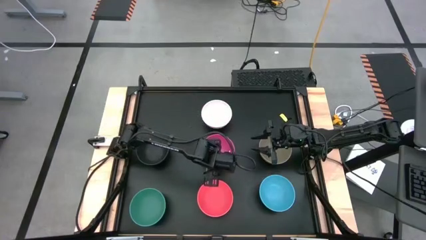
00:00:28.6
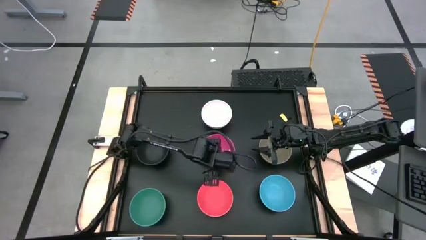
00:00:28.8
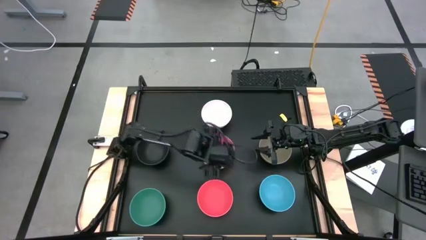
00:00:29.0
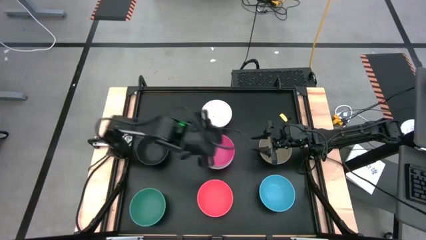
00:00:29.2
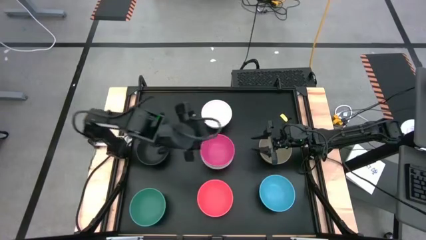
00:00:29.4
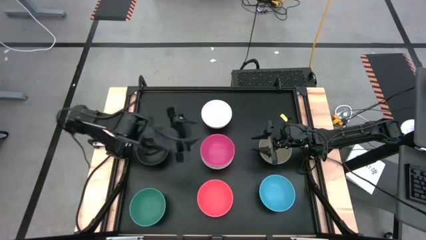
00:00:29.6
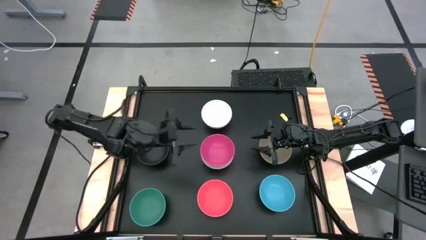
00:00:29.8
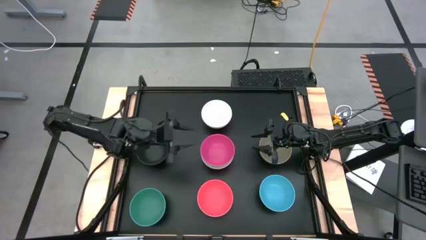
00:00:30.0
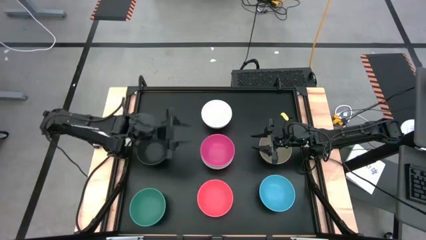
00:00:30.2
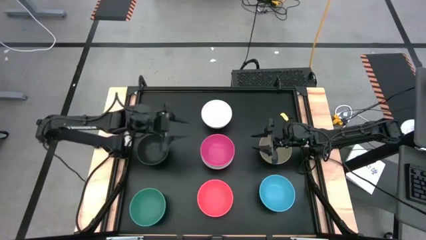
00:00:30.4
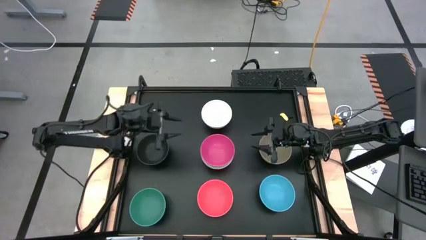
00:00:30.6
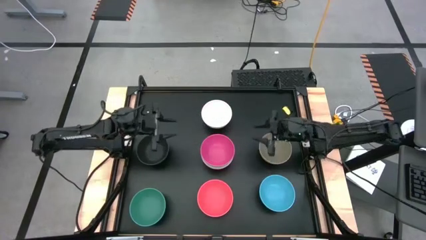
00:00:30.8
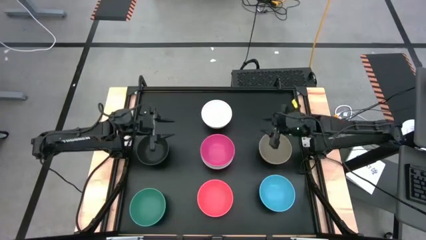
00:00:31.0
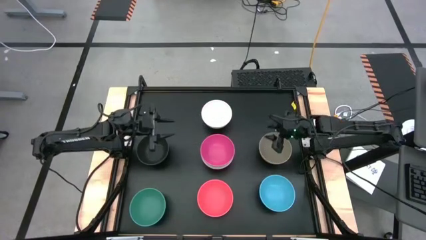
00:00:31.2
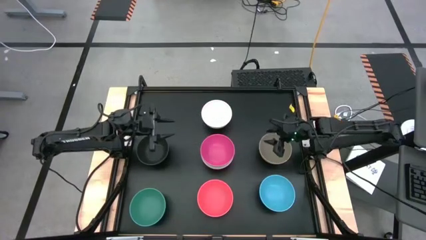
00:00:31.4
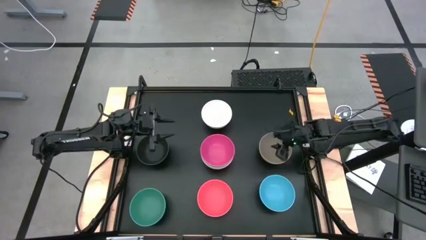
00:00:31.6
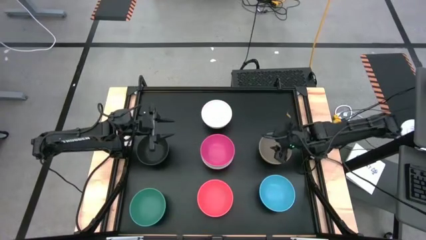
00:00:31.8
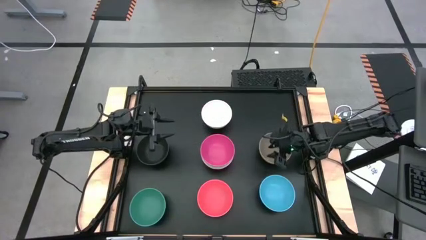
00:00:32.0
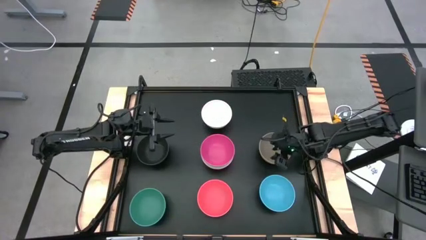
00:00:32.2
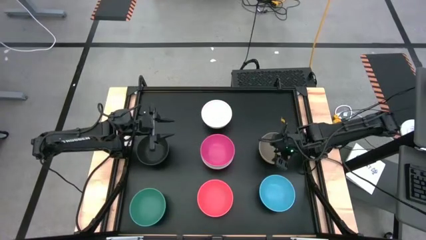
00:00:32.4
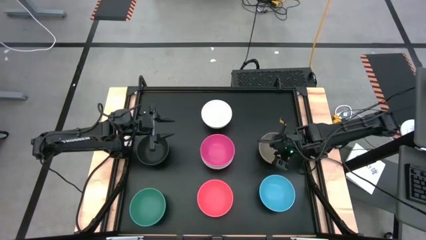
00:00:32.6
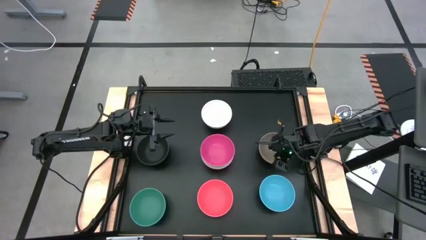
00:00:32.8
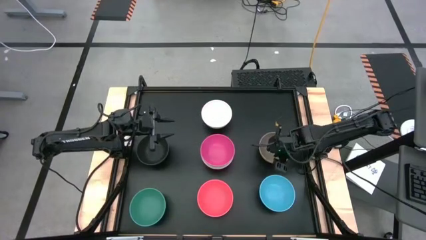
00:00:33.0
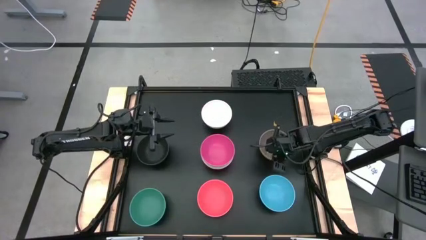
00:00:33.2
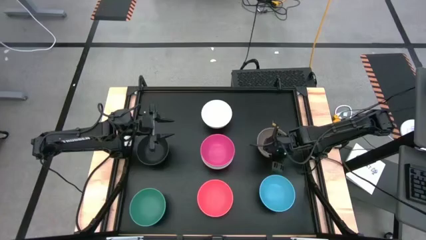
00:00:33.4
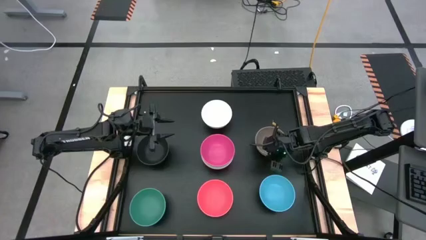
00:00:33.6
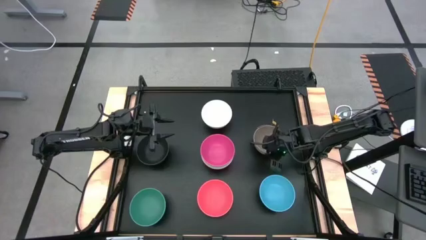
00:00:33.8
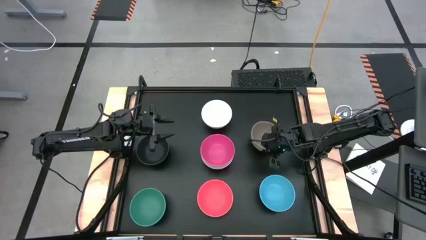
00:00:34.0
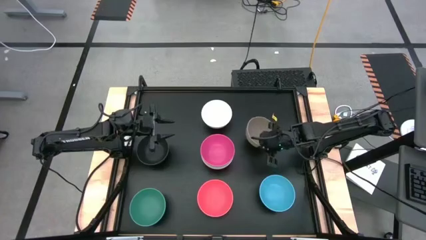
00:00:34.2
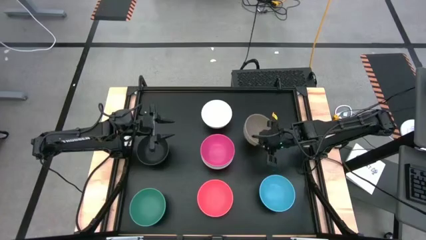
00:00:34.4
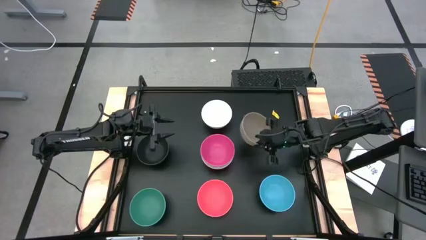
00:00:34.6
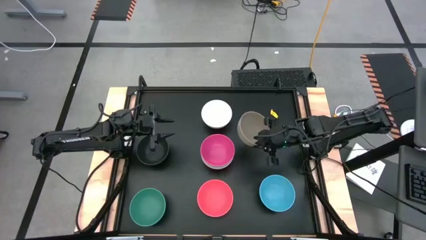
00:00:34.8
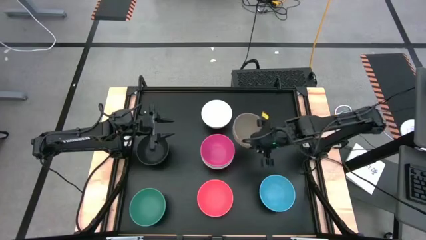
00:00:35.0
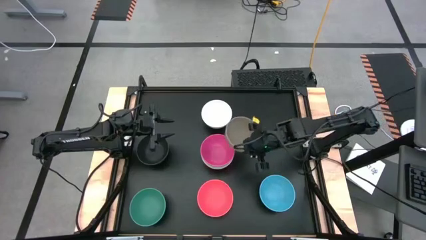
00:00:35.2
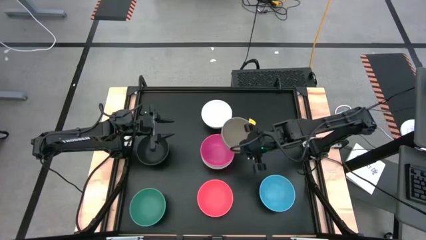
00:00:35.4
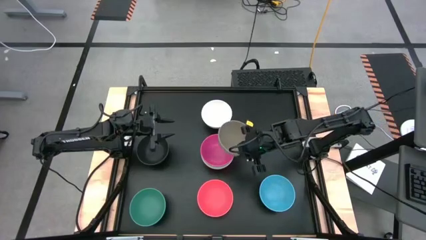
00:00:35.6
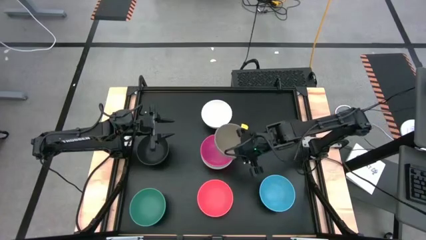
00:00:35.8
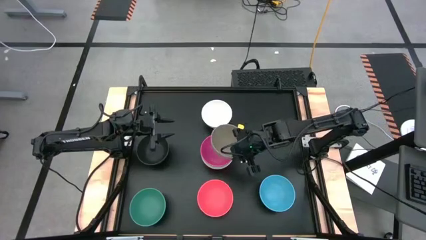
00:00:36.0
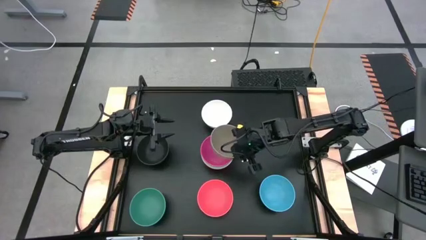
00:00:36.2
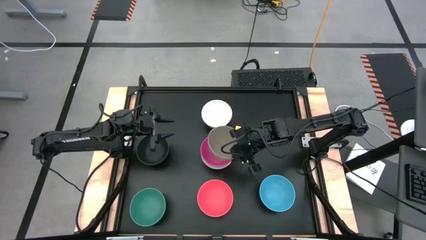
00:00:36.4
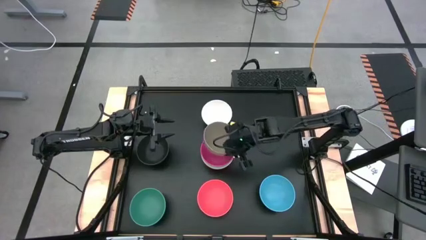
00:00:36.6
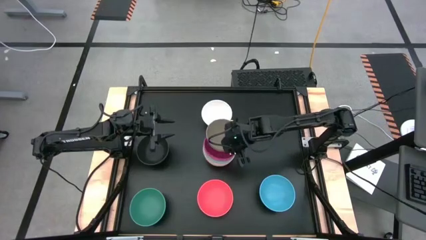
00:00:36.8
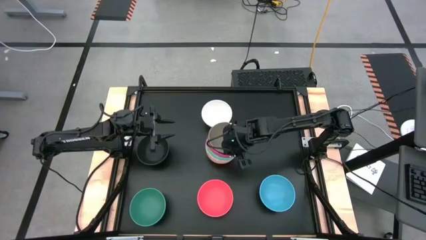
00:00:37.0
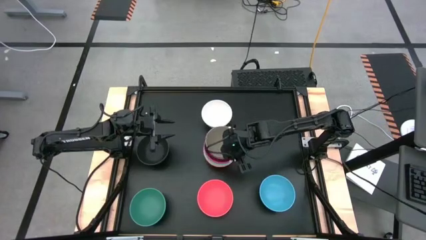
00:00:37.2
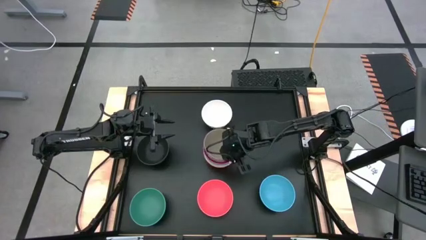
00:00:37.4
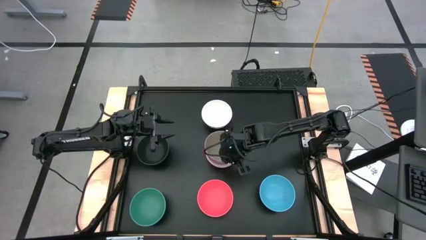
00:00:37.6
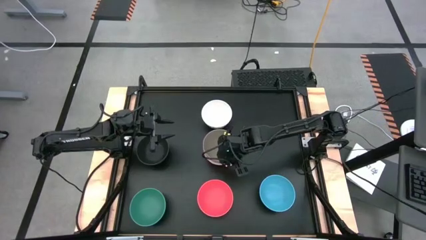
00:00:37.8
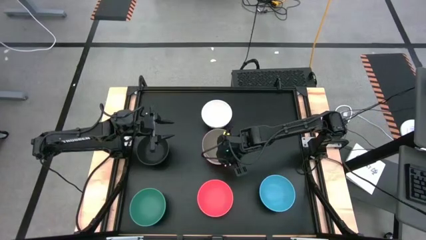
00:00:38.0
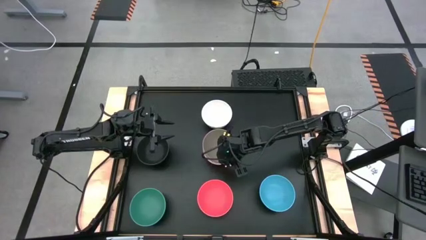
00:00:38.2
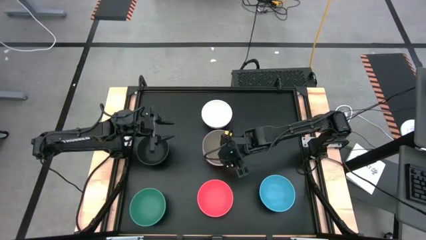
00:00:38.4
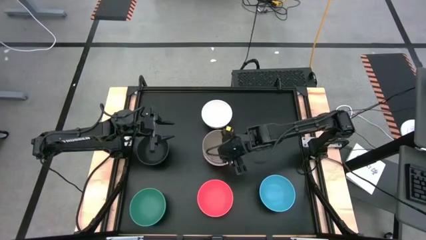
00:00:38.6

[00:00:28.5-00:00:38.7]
Task: Nest bowls inside each other
Stack the brown bowl on top of the pink bowl

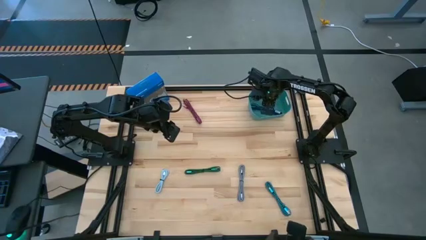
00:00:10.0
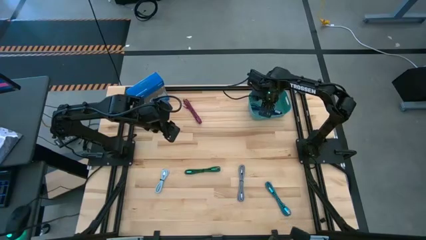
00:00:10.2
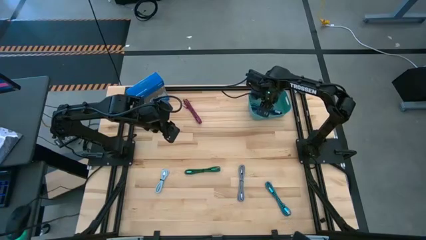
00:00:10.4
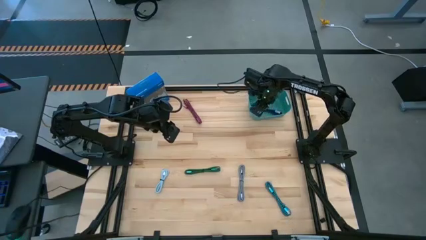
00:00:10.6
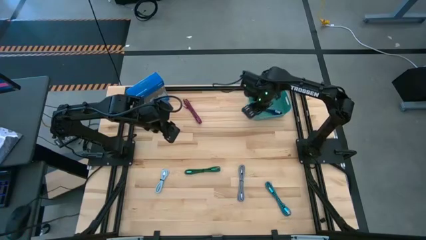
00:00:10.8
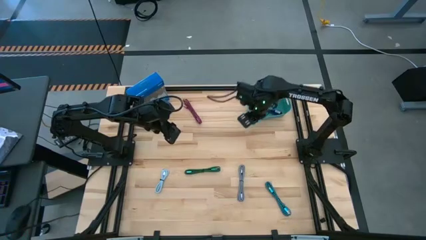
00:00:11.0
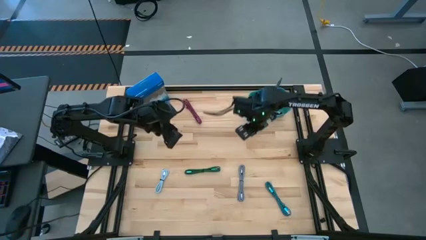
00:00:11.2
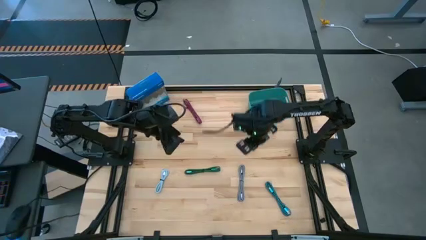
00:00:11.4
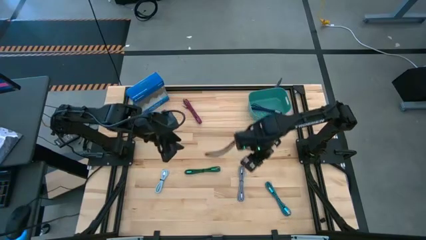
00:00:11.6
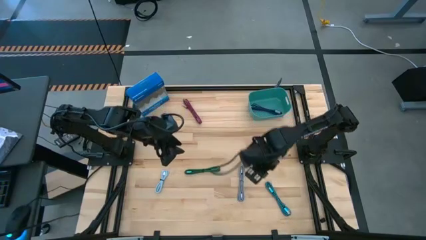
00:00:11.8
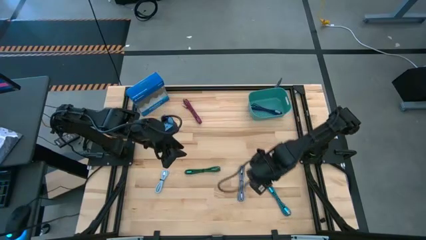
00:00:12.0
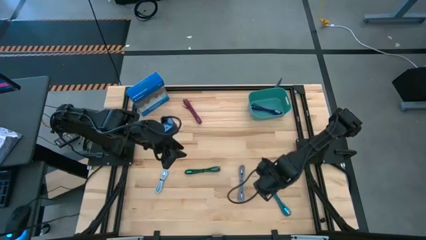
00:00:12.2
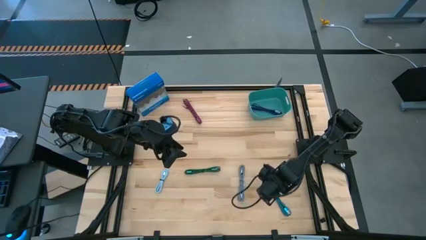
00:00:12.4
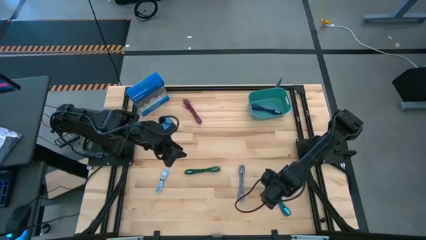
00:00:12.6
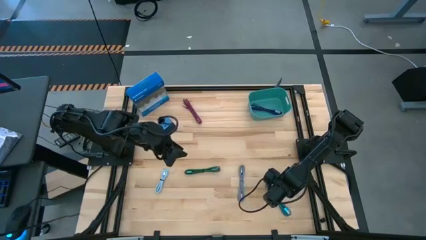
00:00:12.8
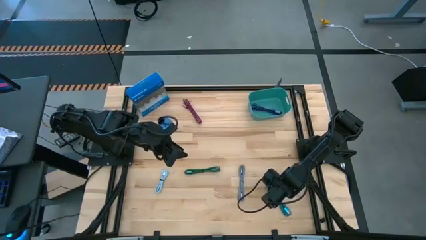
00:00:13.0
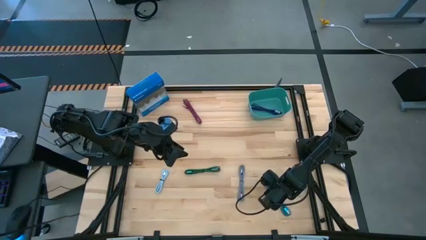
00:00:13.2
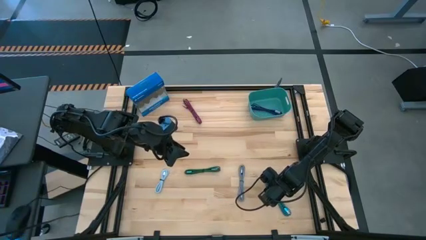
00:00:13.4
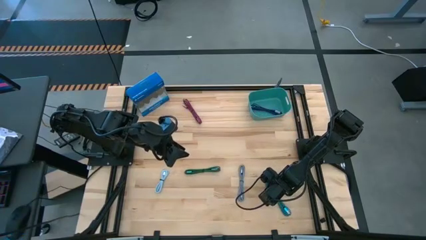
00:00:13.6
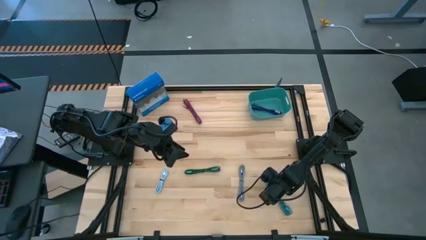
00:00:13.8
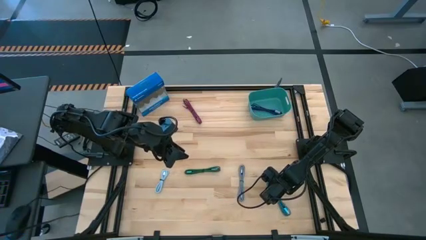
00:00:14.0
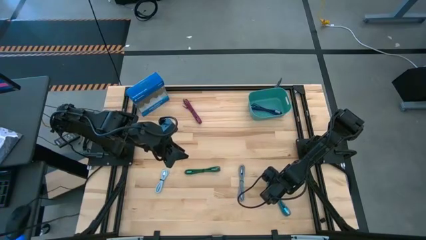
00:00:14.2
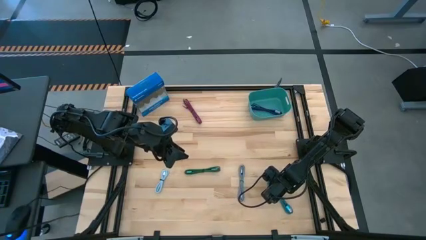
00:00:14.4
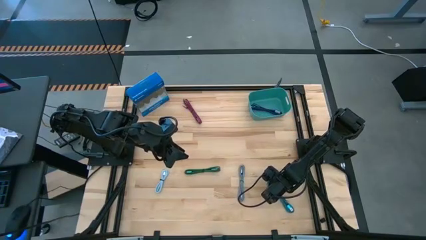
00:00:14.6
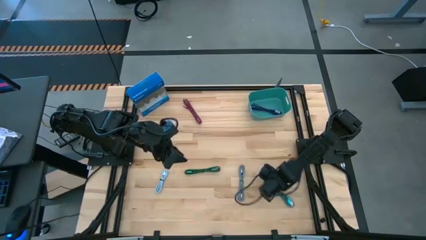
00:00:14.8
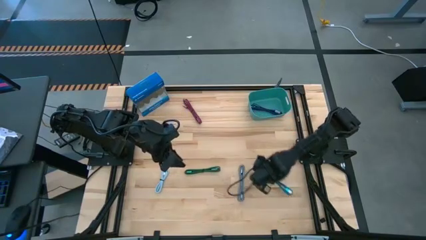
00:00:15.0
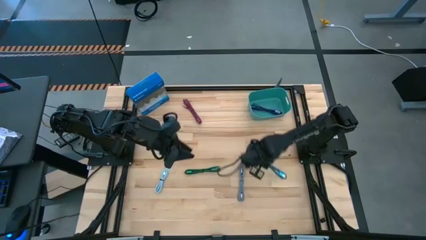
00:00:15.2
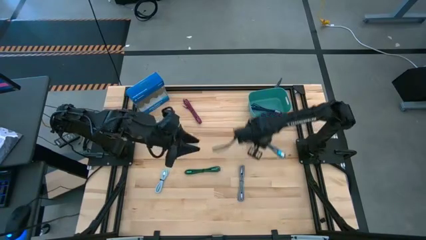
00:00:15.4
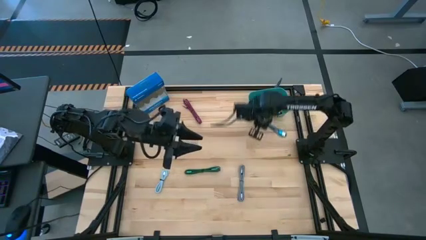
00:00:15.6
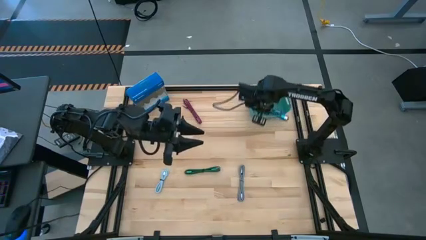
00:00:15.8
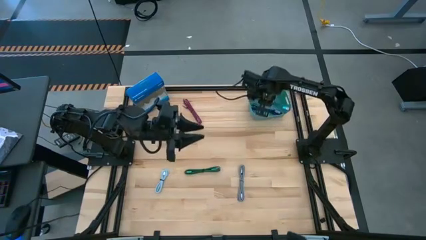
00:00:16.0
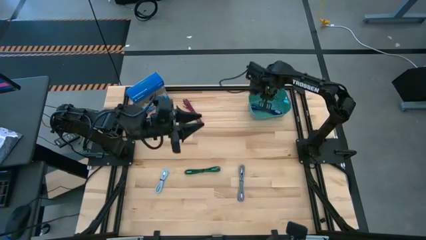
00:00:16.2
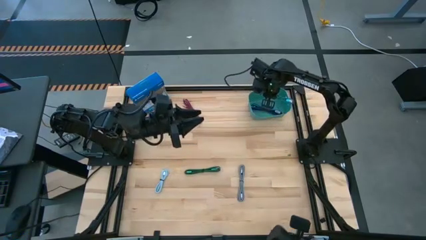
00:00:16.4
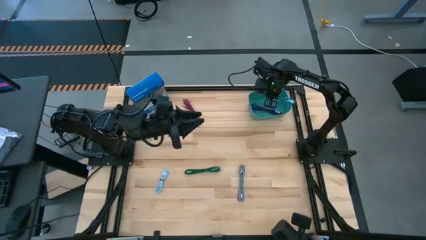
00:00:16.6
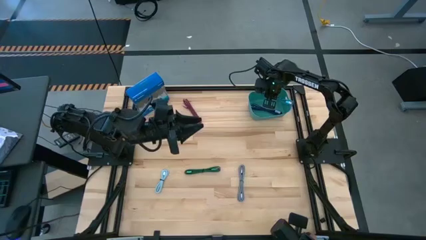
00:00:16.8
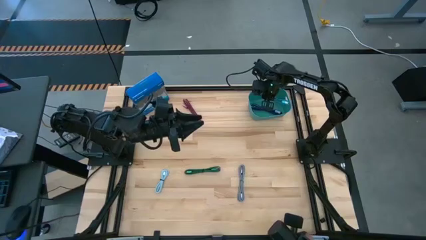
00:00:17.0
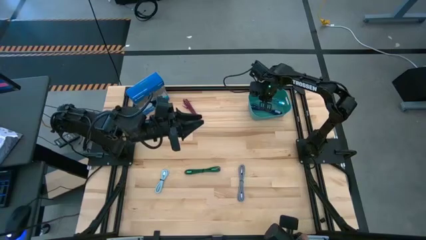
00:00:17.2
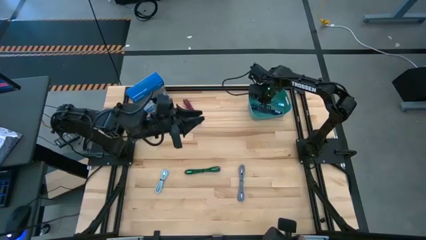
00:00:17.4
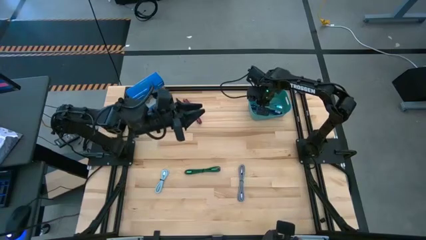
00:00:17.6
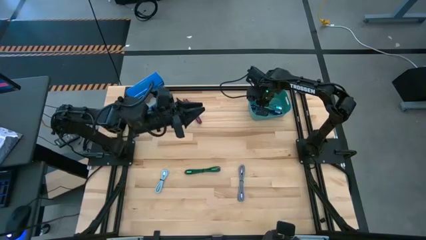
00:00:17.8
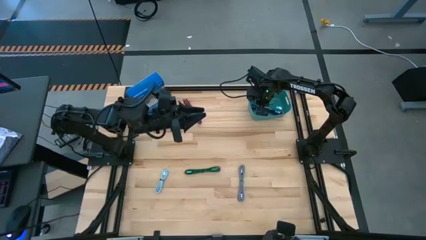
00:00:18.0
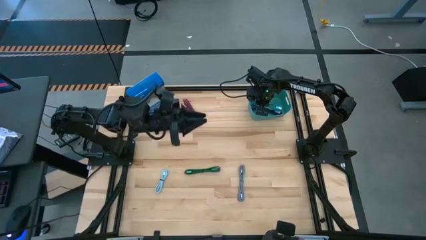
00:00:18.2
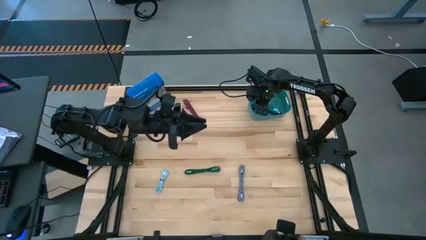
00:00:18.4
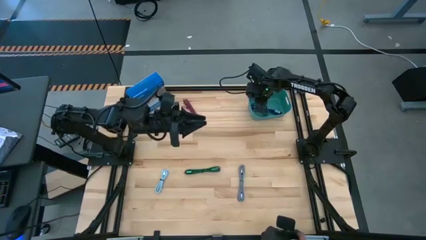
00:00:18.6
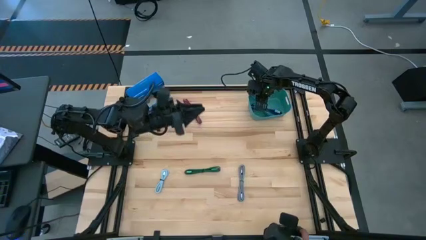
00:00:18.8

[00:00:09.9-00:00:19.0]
Task: Pick and place USB-C Cables
Put the blue charger cable into the green bin
